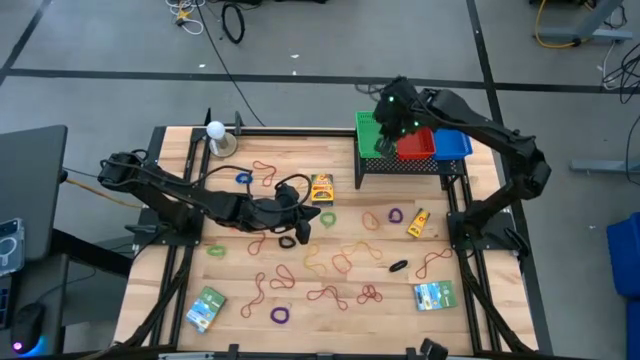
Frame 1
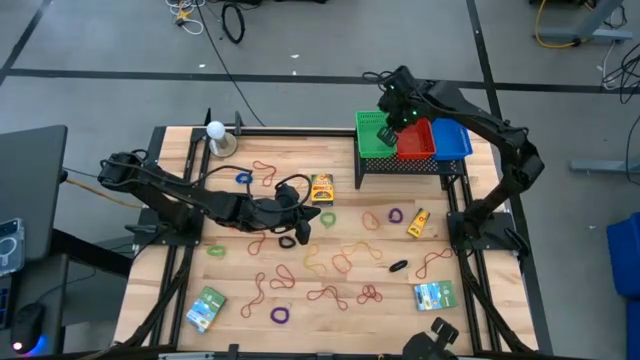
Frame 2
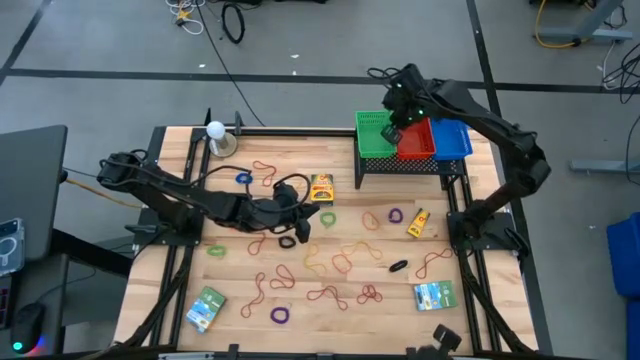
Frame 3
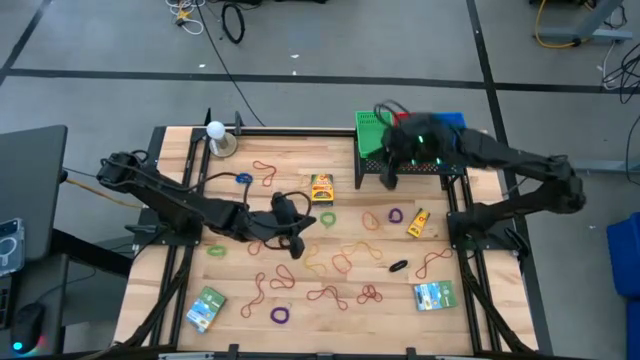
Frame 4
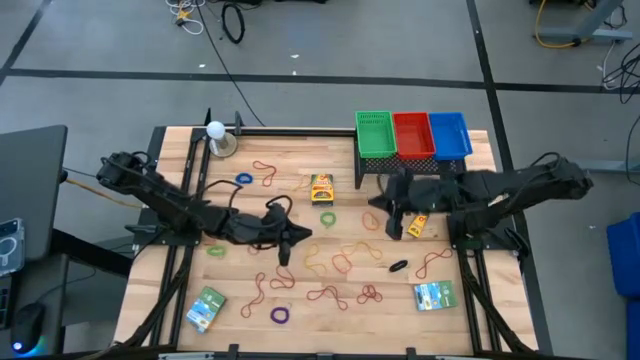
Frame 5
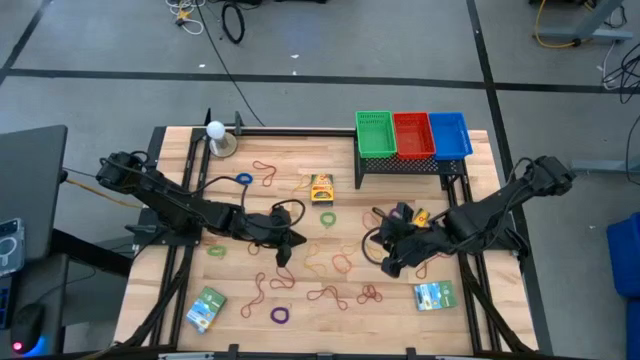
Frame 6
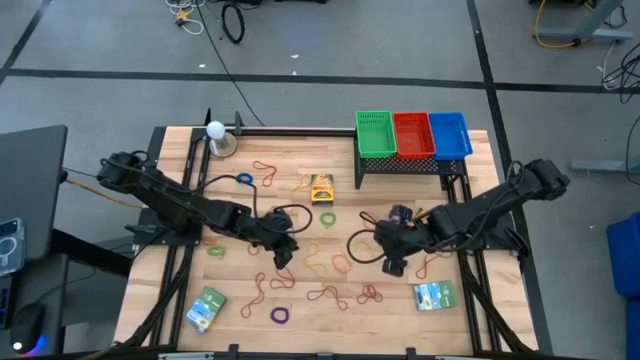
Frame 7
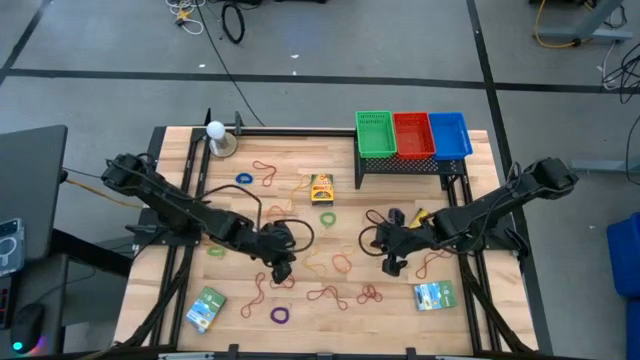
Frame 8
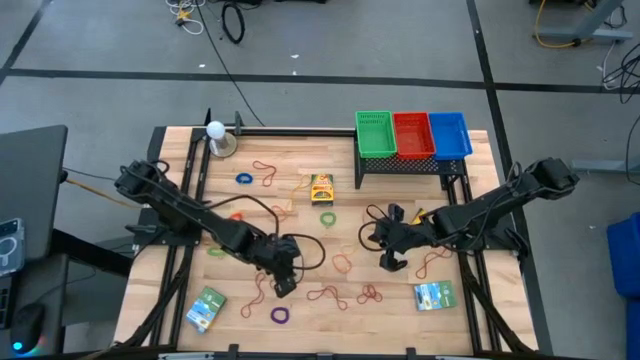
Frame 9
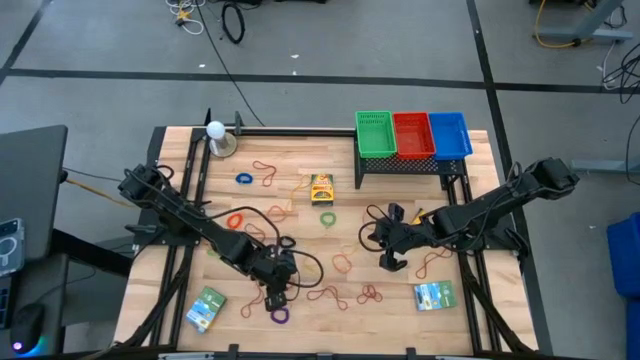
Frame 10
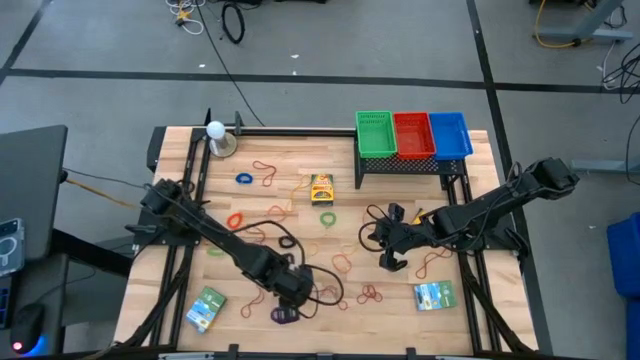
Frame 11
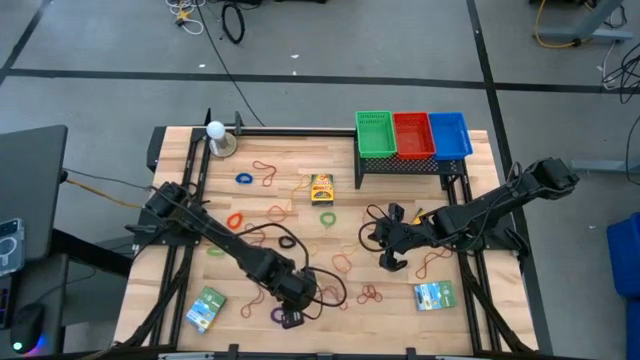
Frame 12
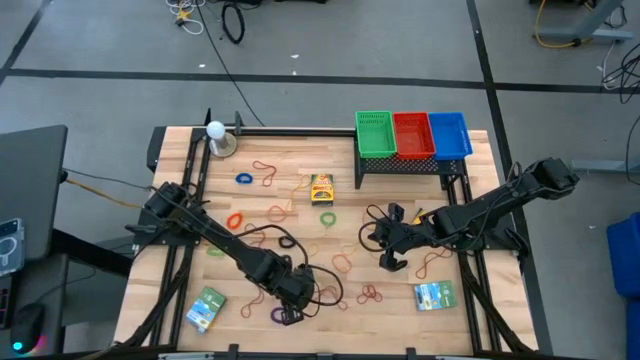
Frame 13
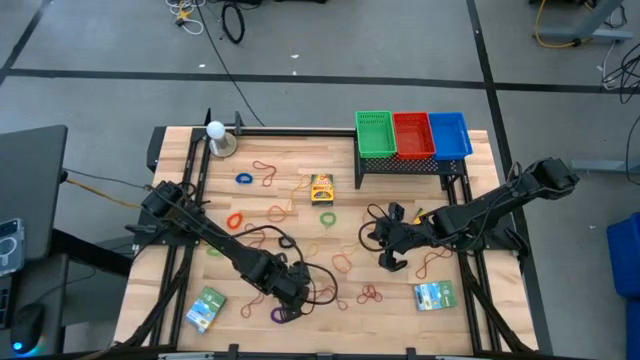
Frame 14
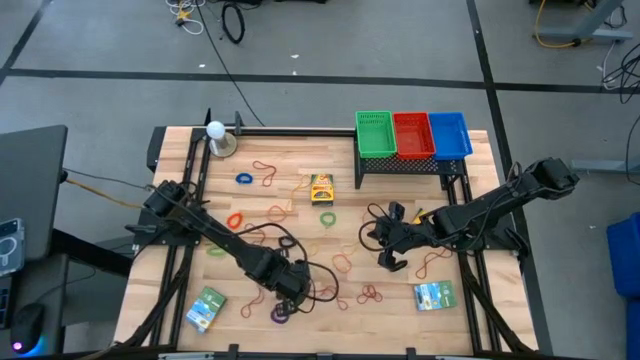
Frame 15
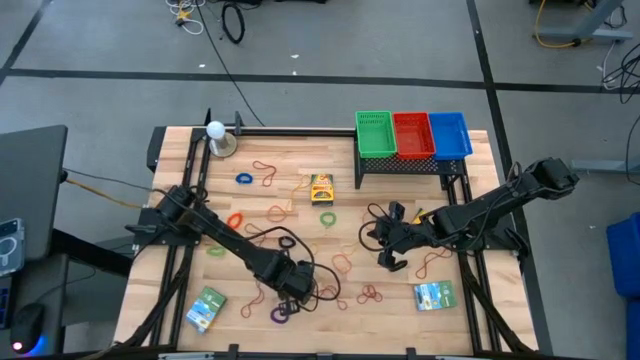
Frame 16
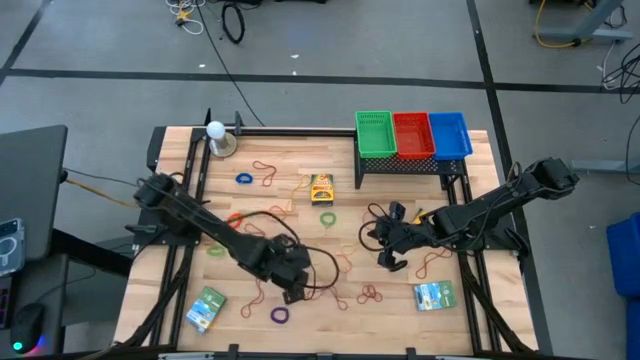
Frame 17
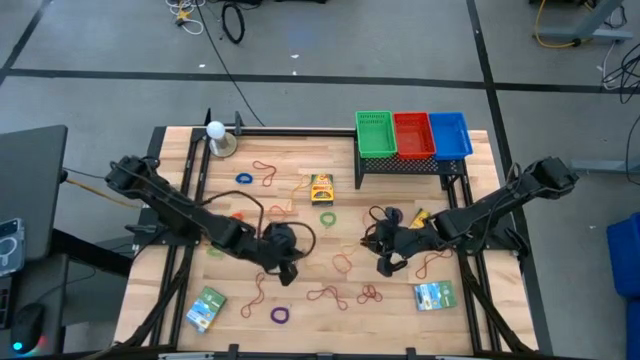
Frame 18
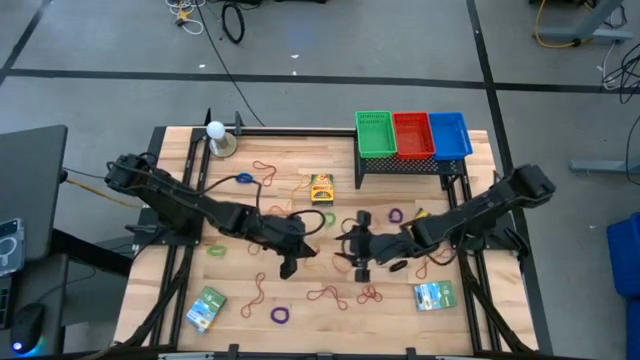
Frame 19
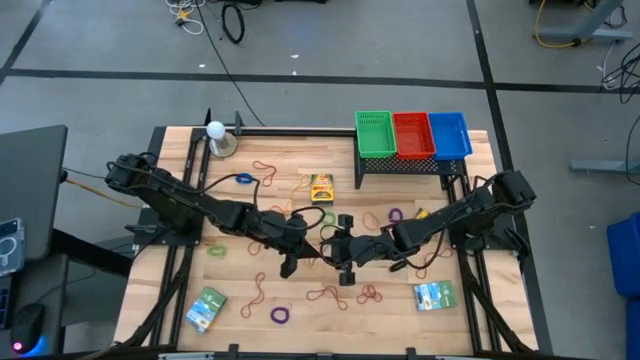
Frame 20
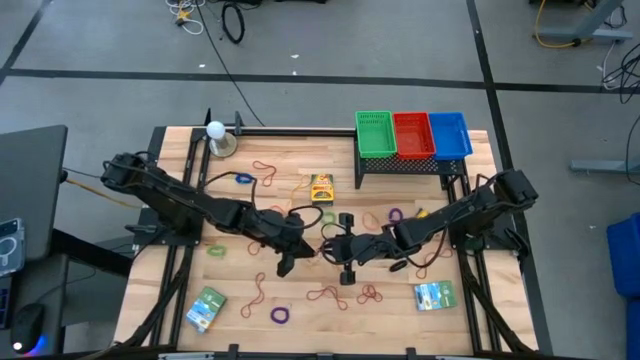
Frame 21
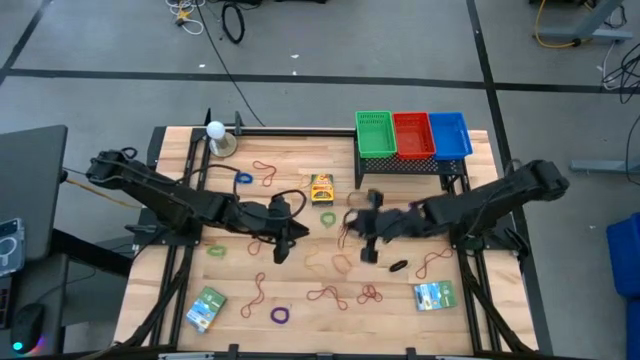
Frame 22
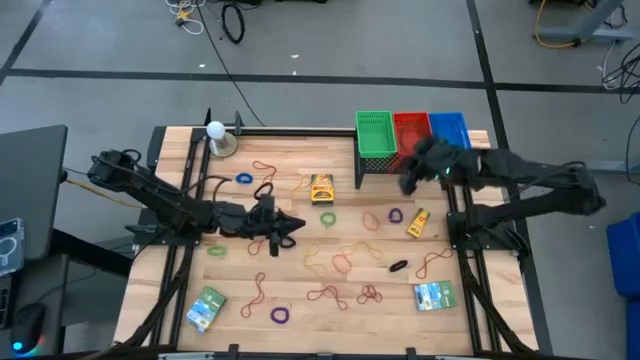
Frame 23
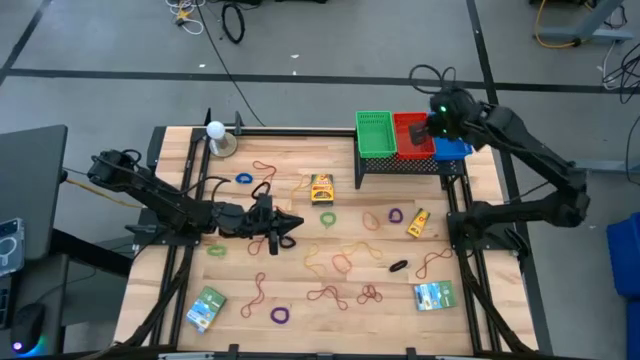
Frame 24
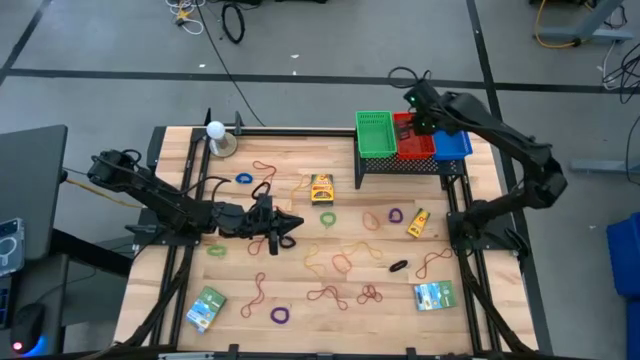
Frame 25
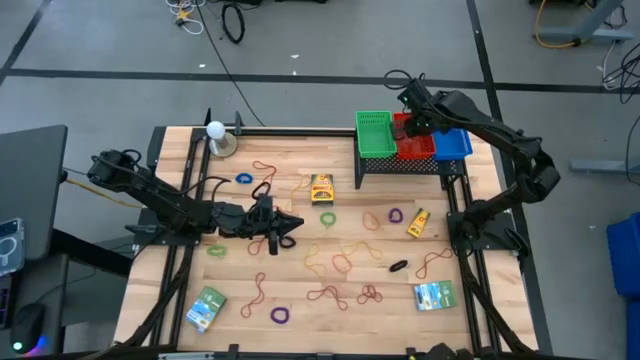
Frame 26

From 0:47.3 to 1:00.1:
Task: Pick & Place Office Desk Supplies
Put the red rubber band into the red bin

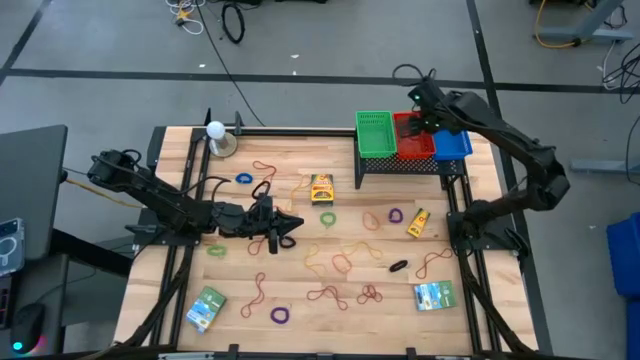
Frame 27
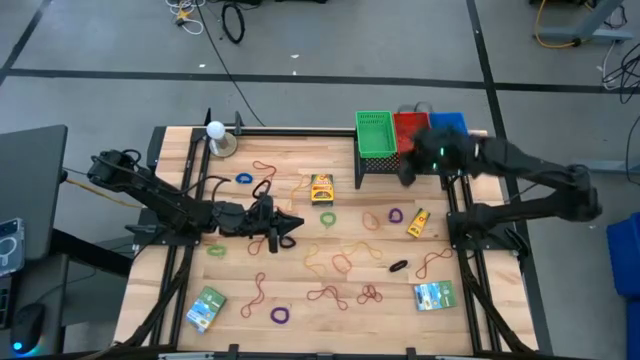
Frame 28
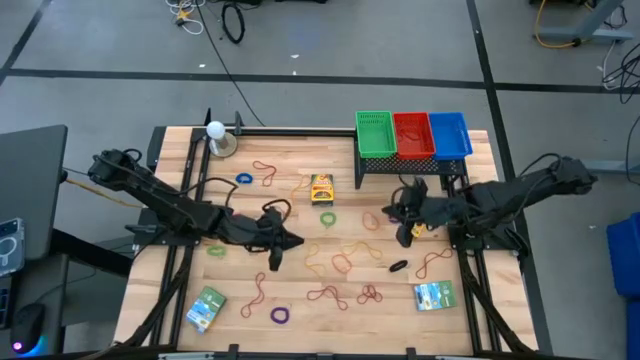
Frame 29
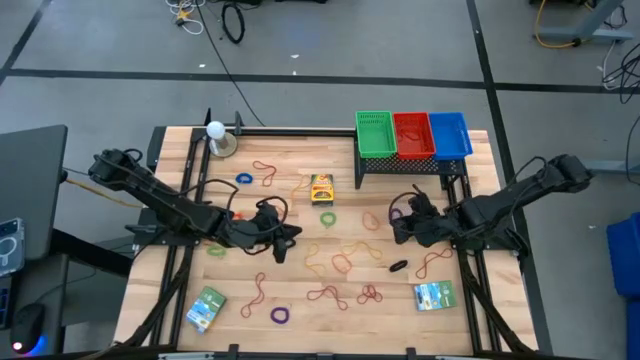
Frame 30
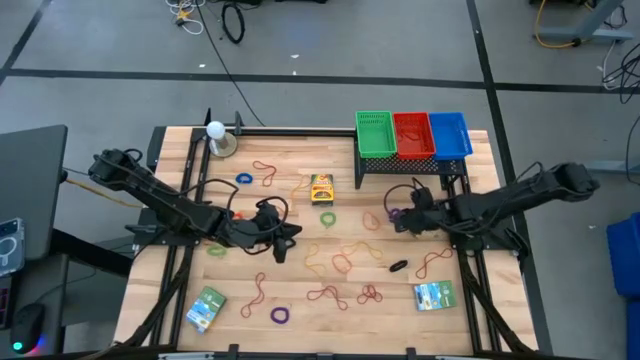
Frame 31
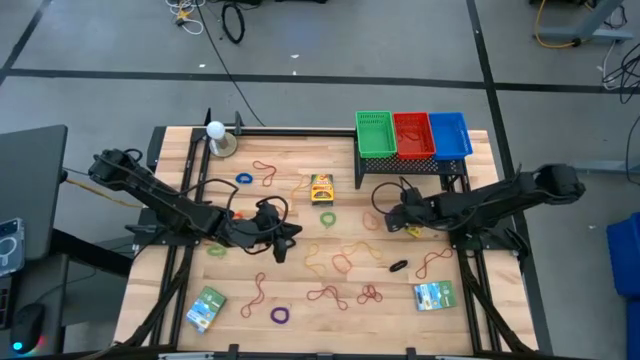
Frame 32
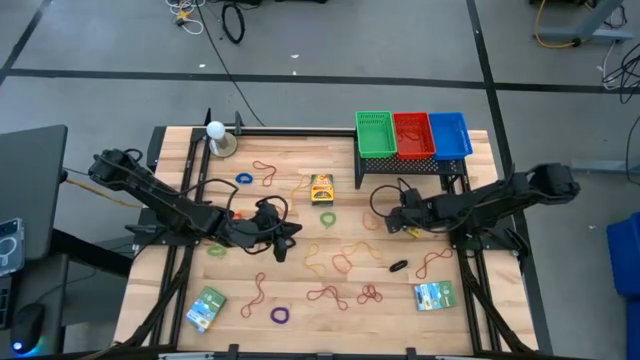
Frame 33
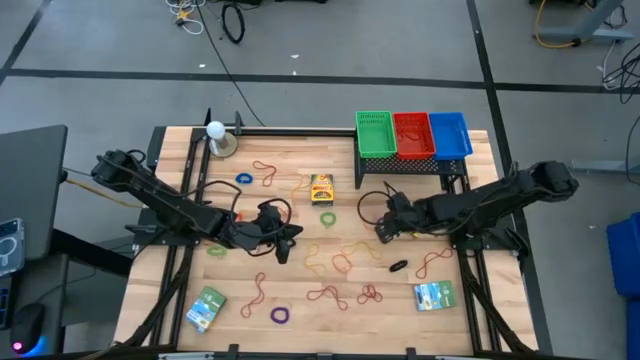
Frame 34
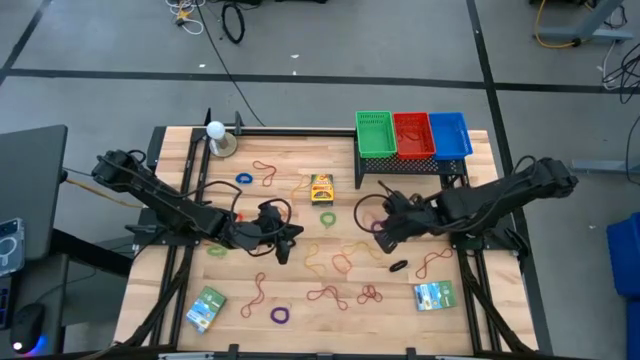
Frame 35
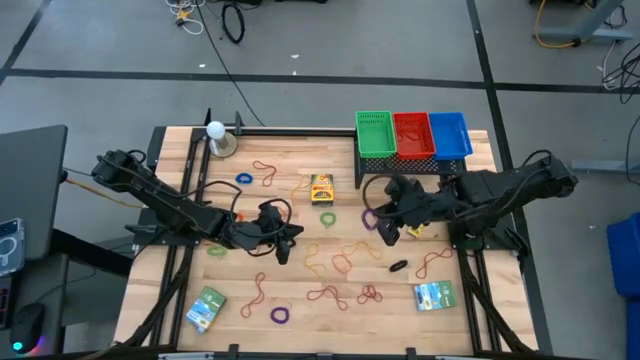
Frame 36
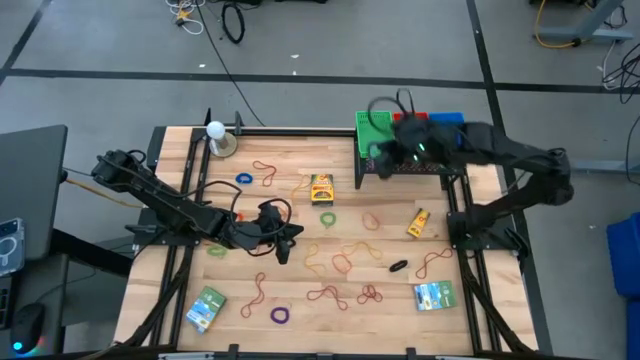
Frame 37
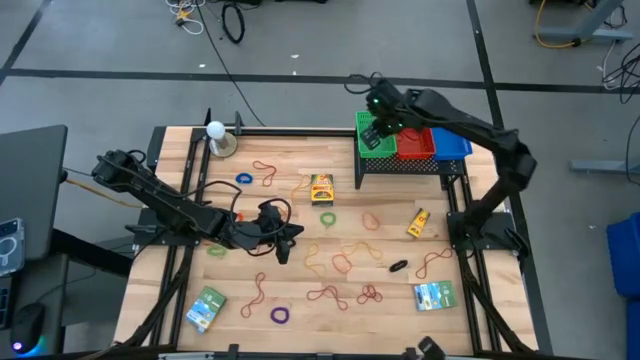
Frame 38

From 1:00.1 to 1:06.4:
Put the purple spring keychain into the green bin

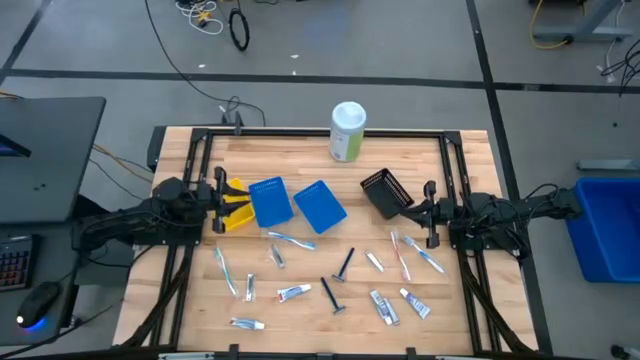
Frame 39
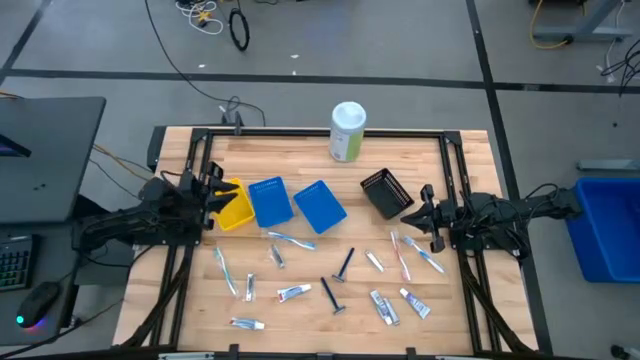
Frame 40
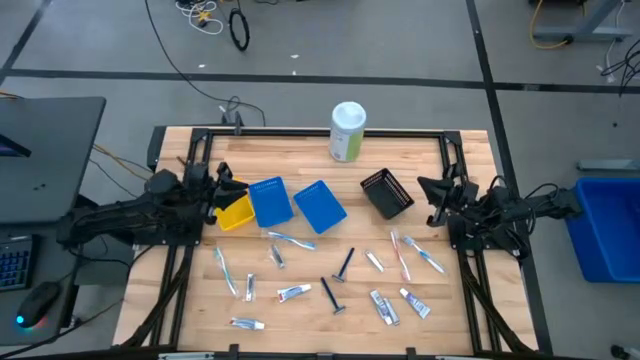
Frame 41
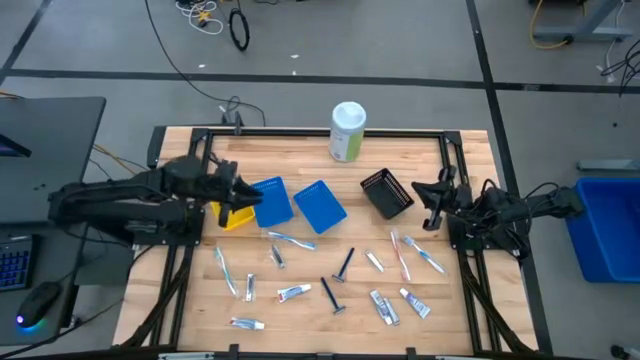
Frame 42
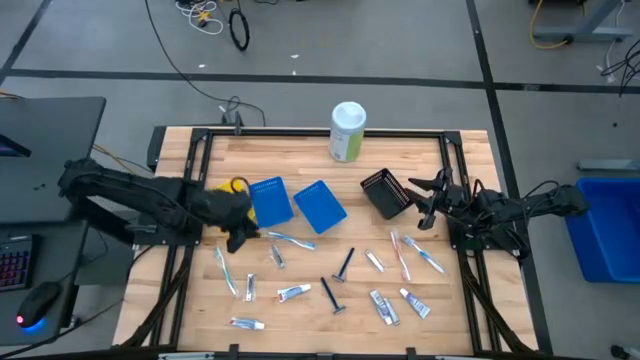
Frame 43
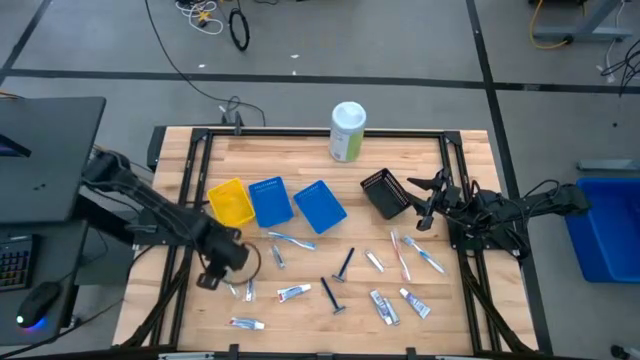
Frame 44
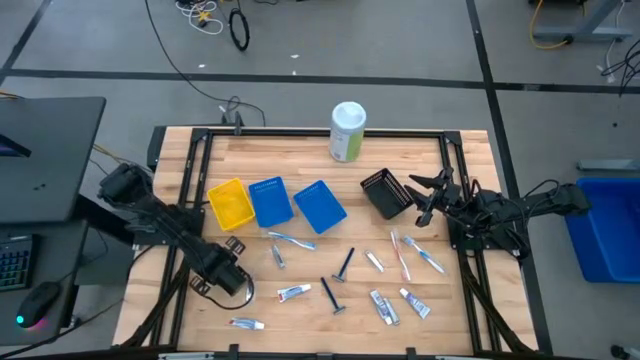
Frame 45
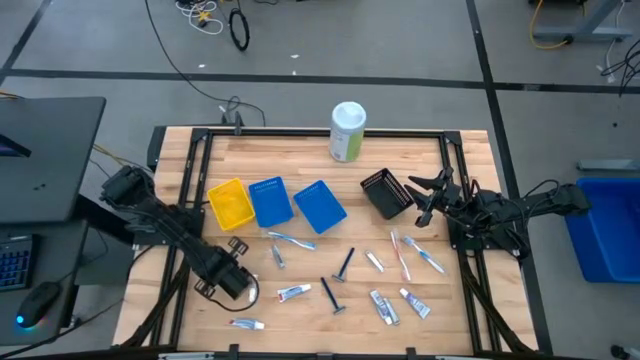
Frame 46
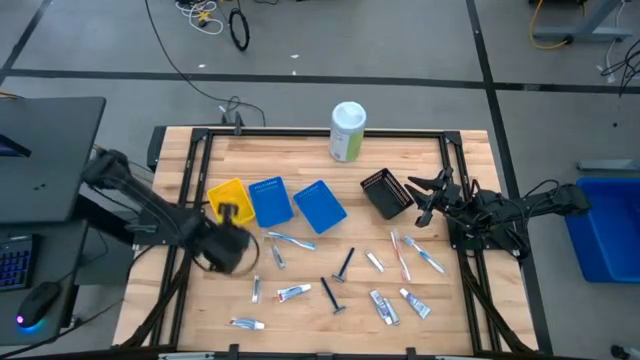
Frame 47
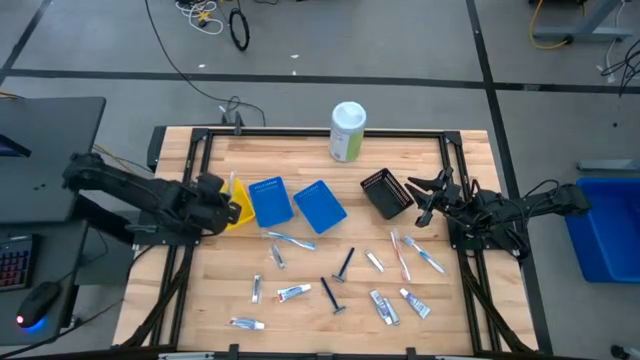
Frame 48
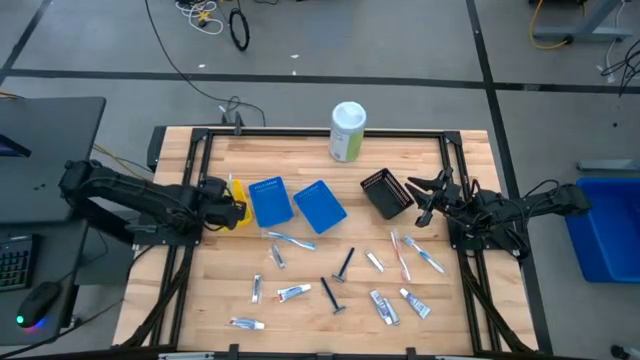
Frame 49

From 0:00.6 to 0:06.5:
Task: Pick & Place Travel size toiletries
Put the green toothbrush into the yellow bin
